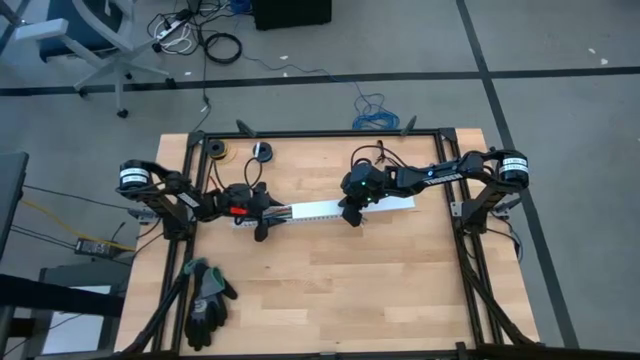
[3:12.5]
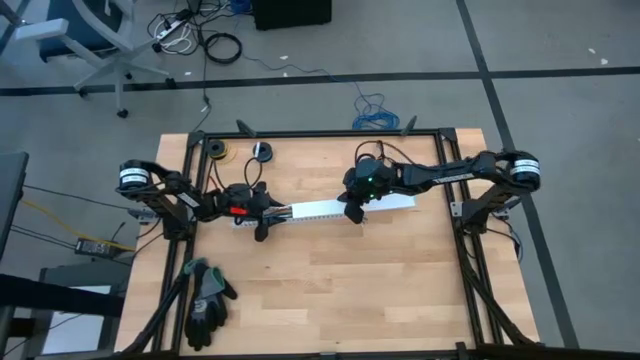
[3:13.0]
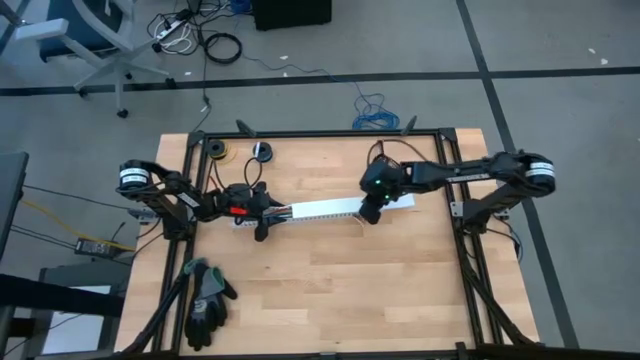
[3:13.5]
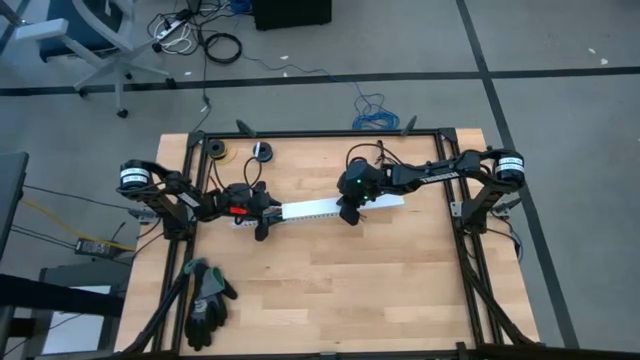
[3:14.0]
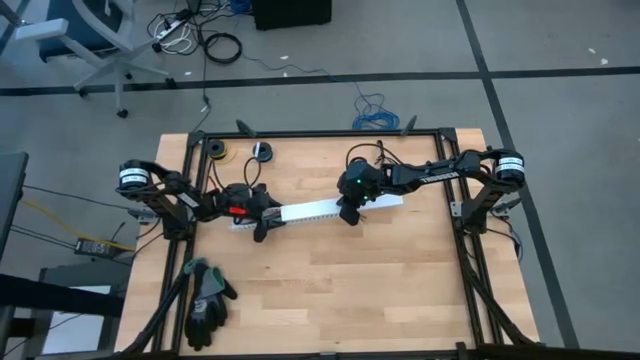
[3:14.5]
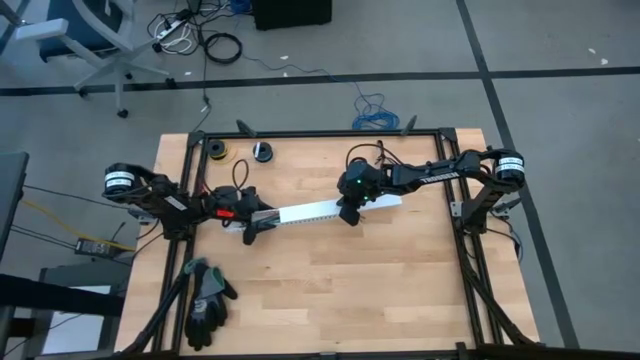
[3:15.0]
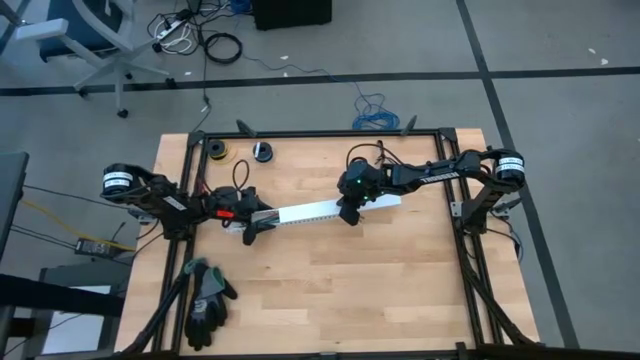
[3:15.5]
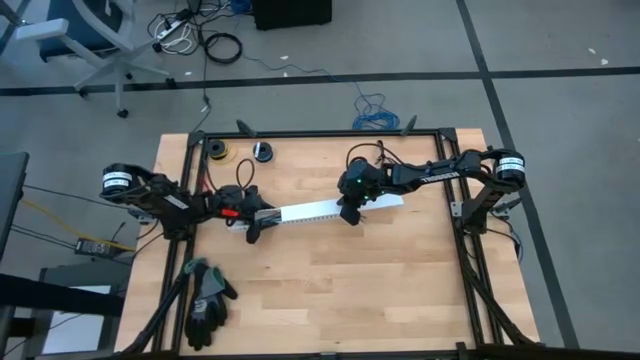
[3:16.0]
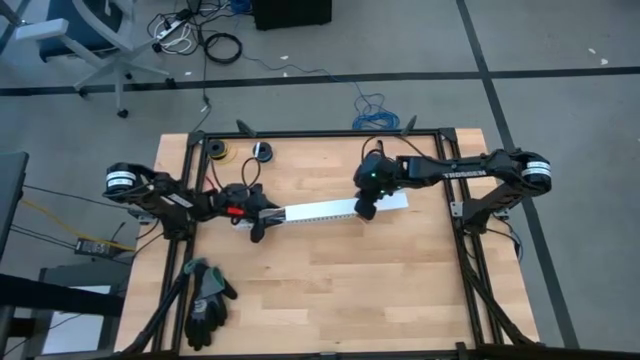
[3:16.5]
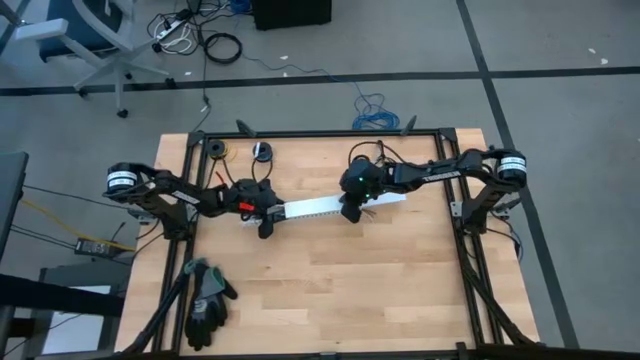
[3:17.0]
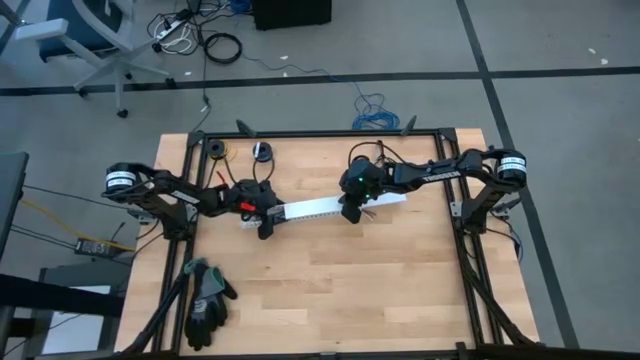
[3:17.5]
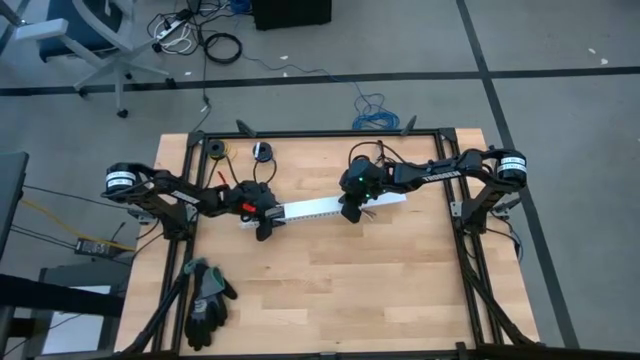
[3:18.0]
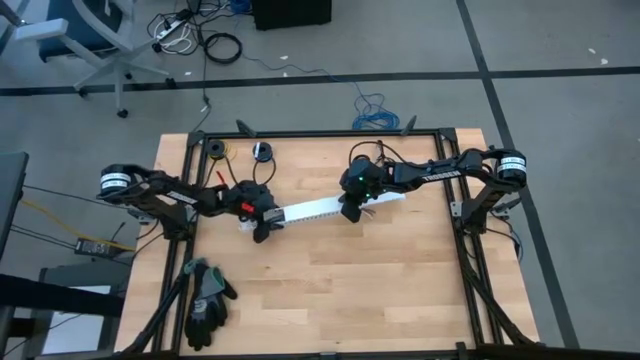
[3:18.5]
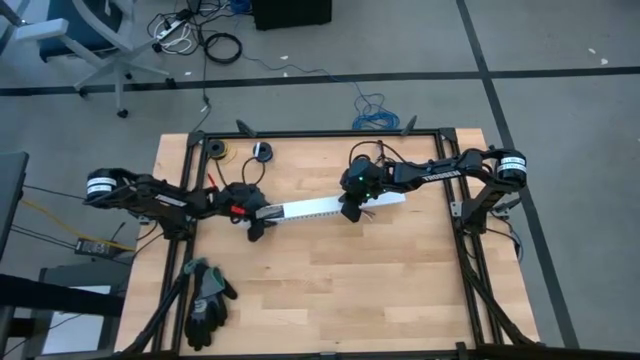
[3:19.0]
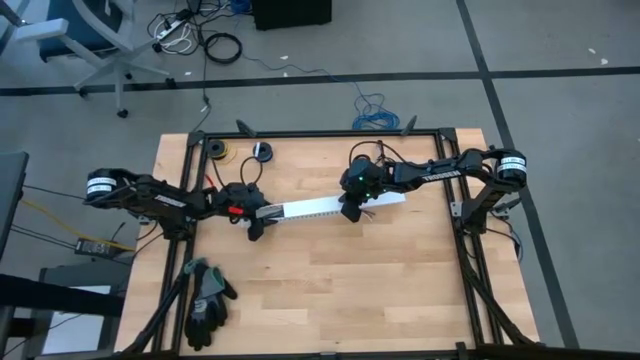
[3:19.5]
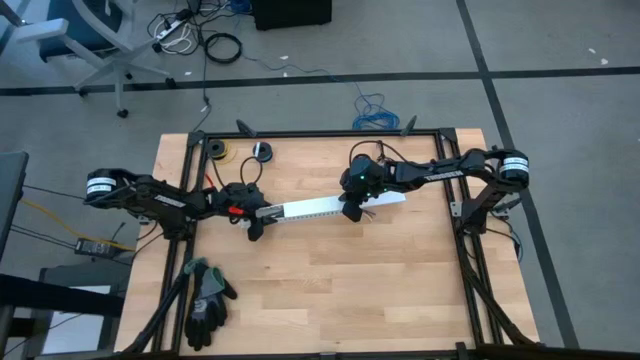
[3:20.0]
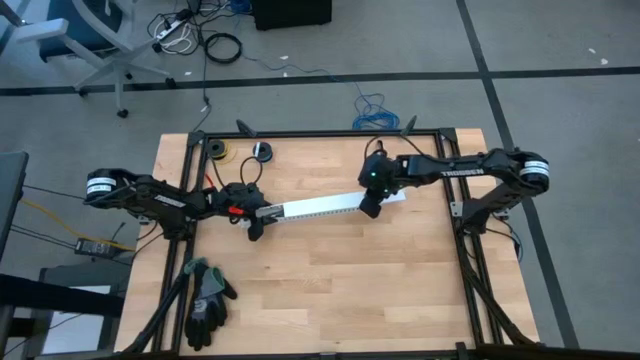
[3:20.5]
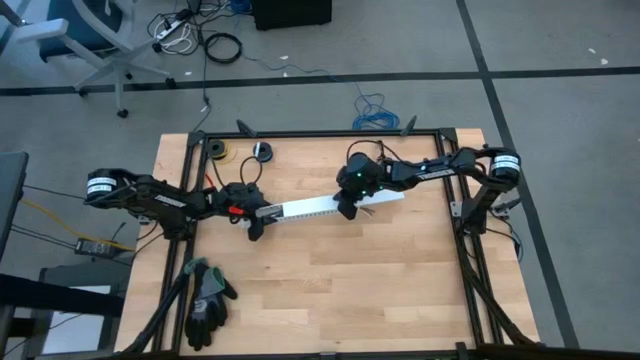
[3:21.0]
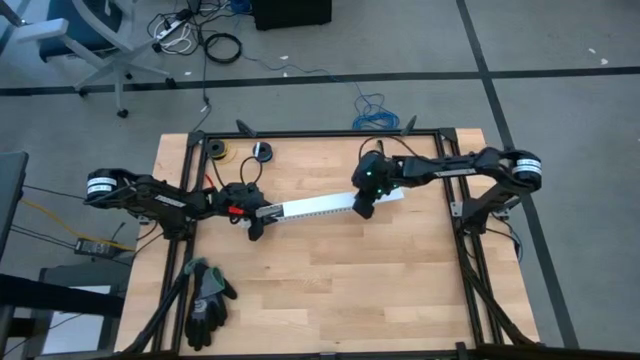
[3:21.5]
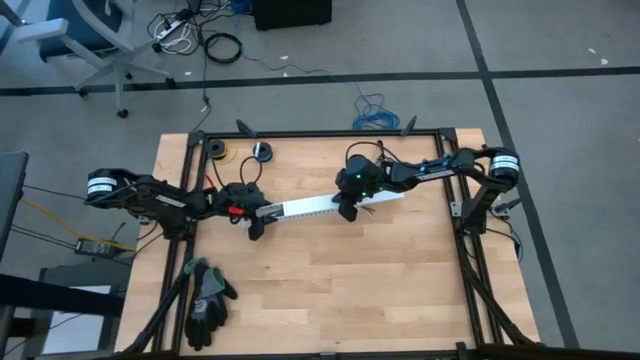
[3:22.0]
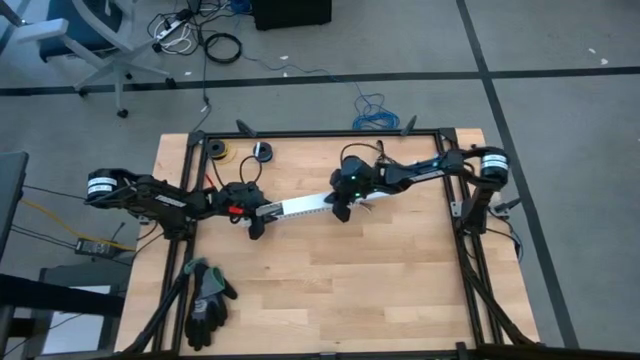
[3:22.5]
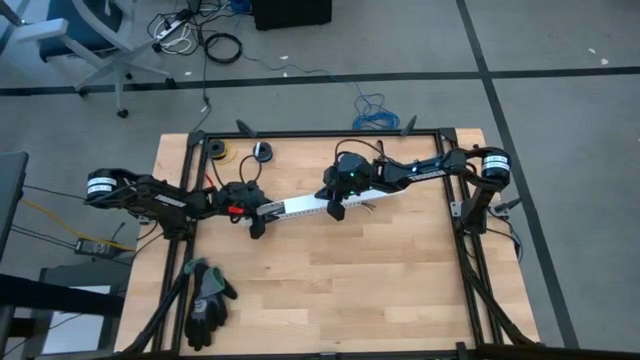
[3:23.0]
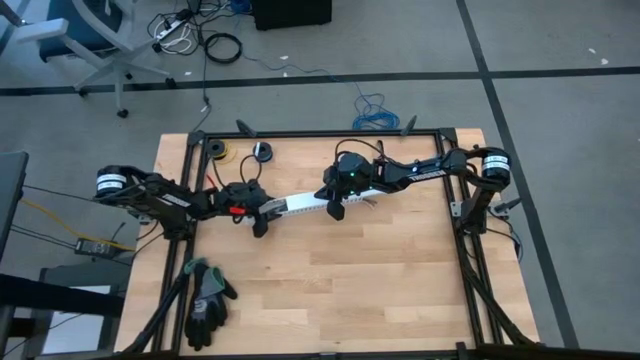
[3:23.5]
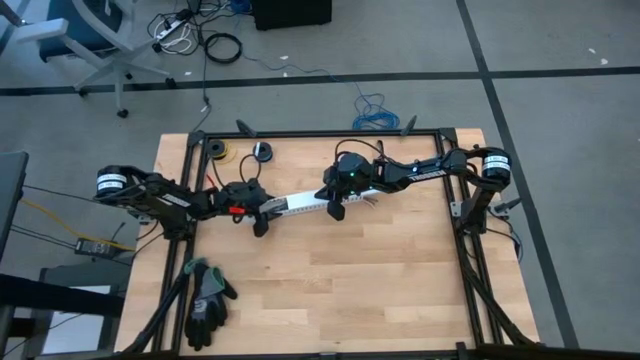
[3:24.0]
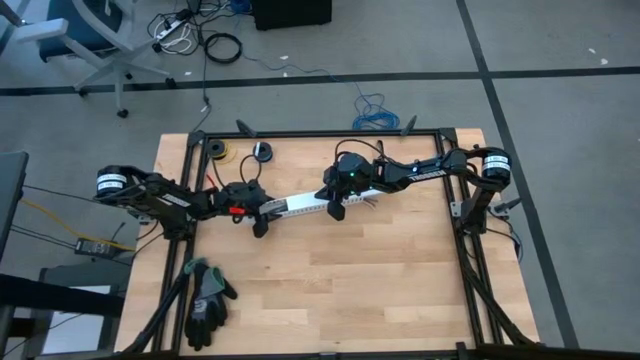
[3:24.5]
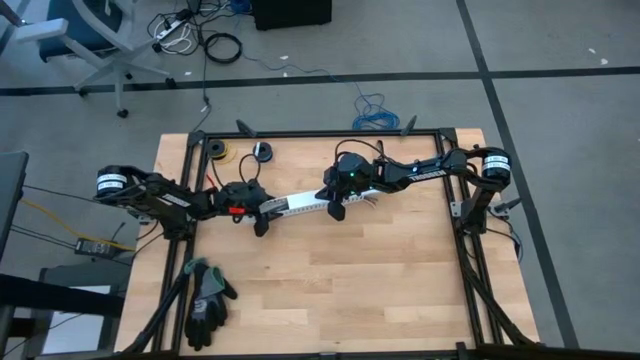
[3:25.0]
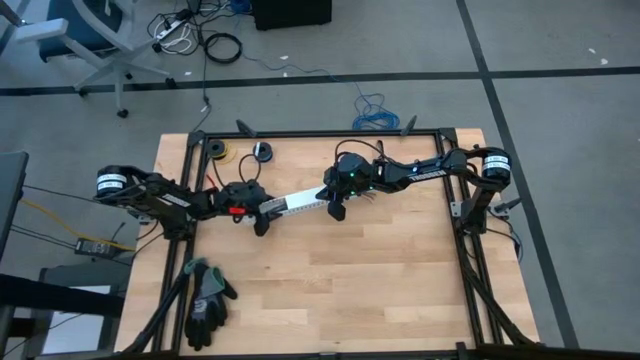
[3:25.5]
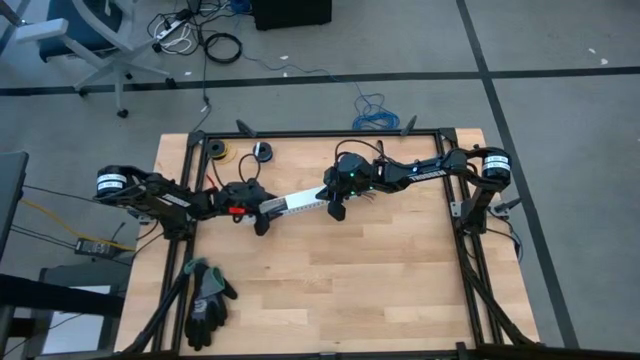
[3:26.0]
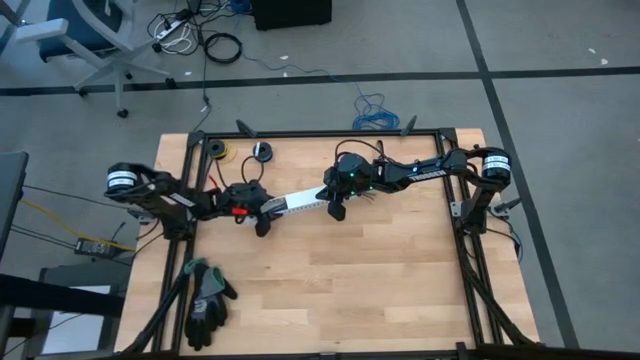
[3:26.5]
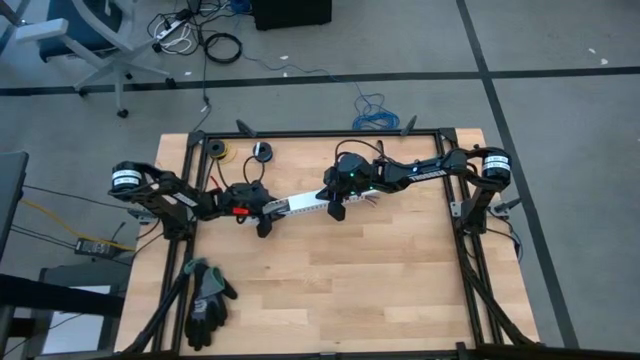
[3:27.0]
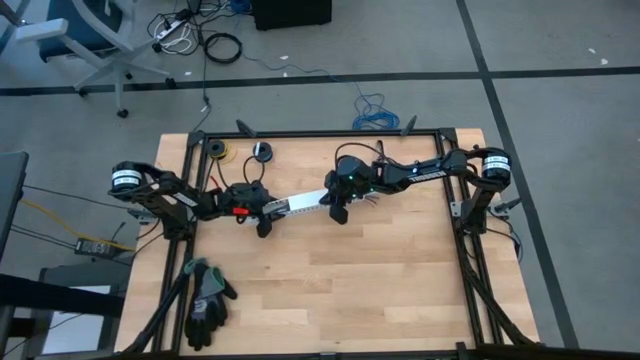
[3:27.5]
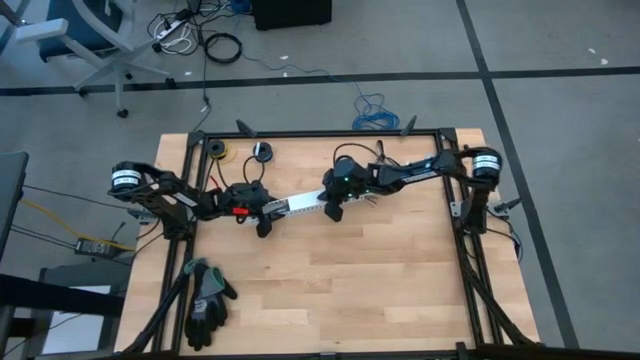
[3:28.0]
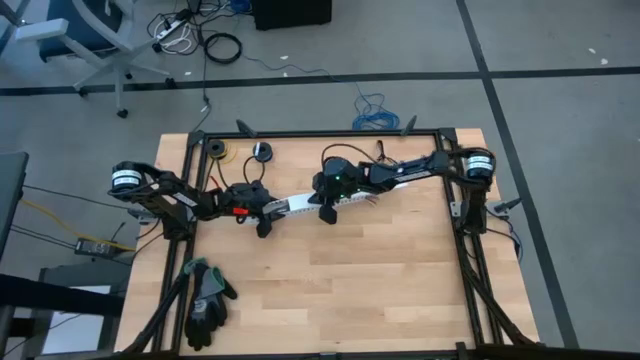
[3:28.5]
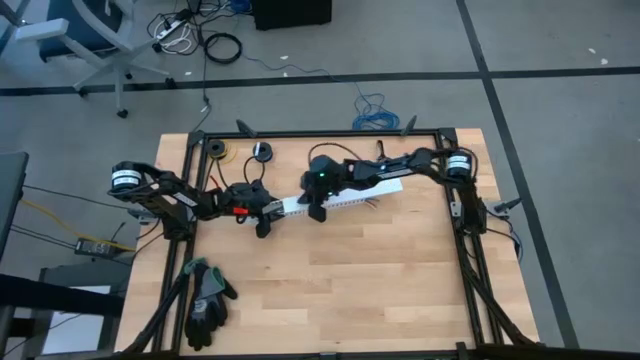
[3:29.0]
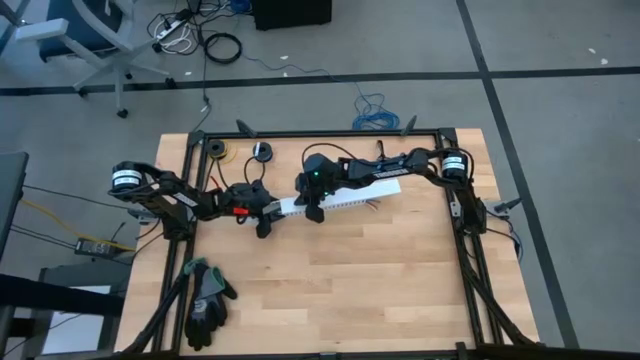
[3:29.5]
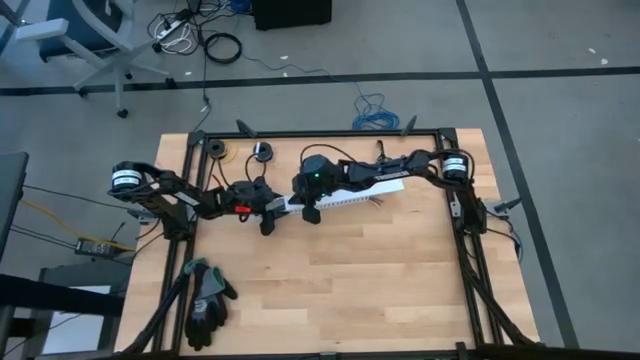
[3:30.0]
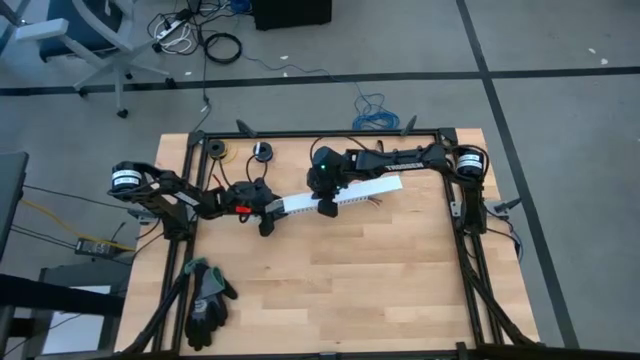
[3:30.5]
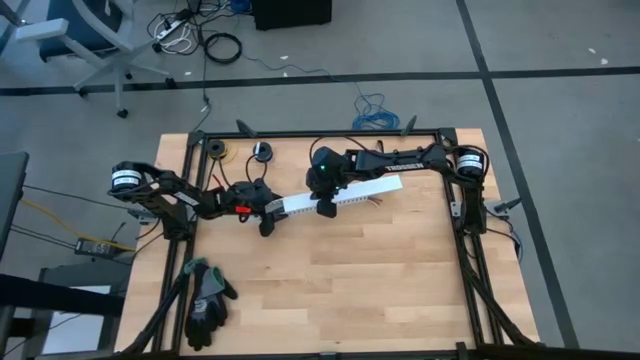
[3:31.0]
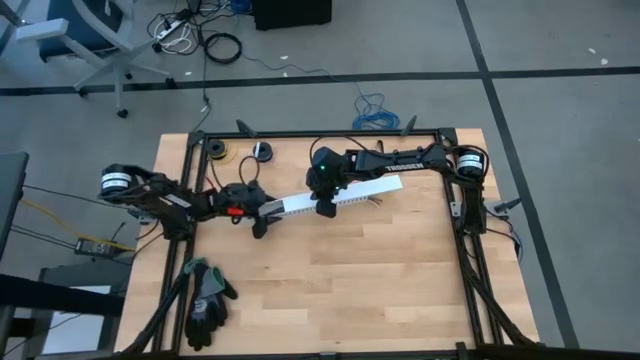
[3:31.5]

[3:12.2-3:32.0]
Task: Ziptie cables
Close the cable duct

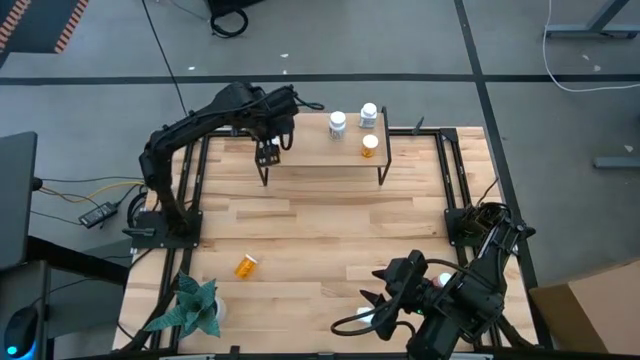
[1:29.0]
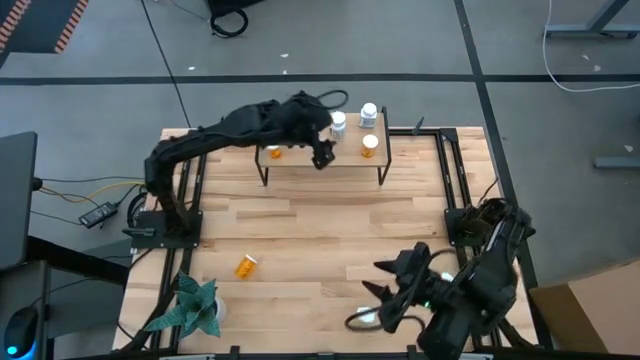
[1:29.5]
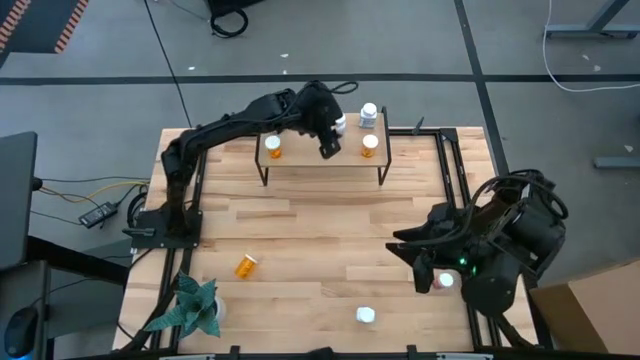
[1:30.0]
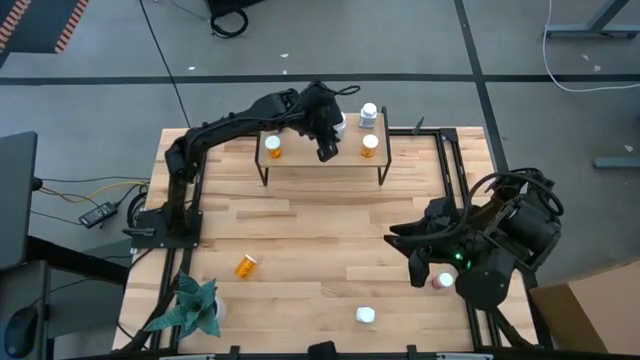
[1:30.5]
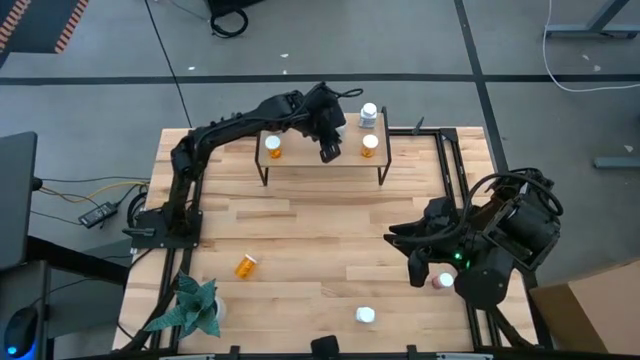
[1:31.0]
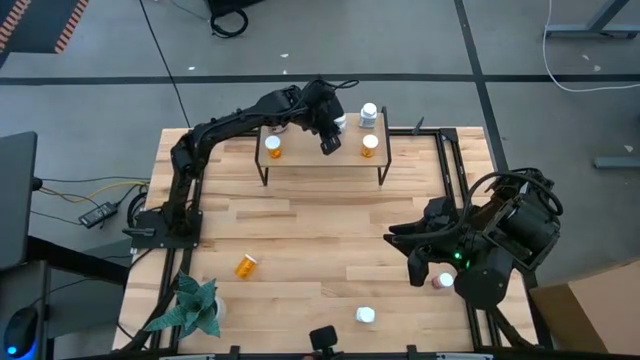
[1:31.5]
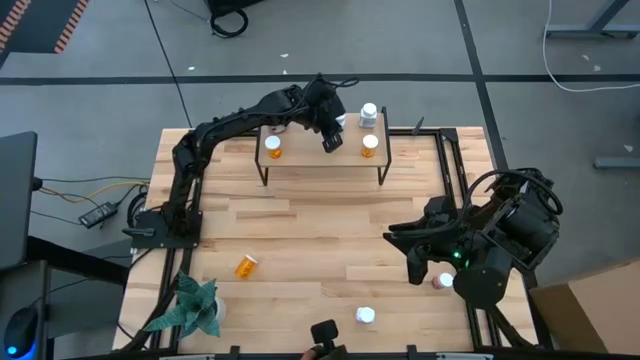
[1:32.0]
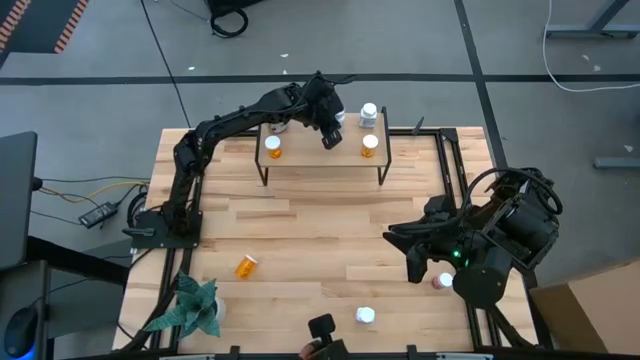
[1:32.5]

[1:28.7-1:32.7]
Task: Pick and place medicine bottles onto shelf by color
Adjust the white medicine bottle on the shelf
